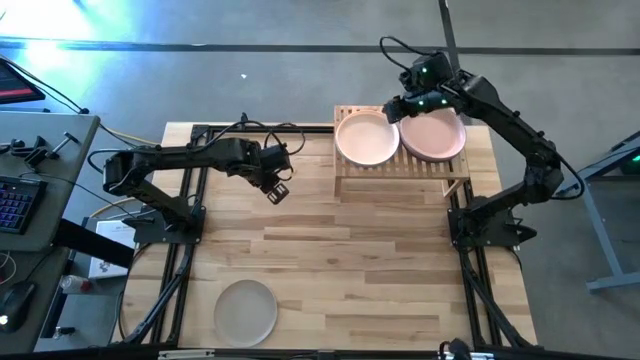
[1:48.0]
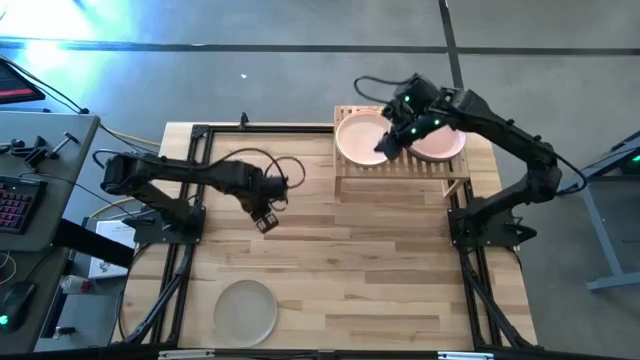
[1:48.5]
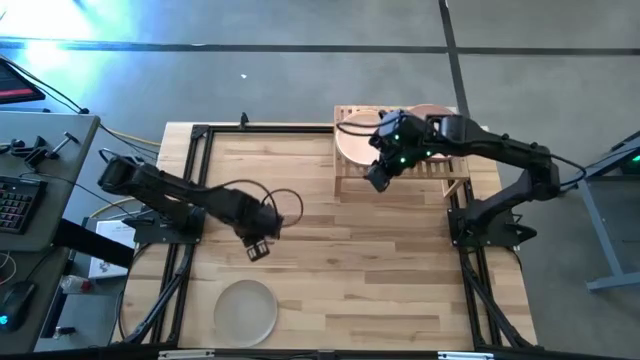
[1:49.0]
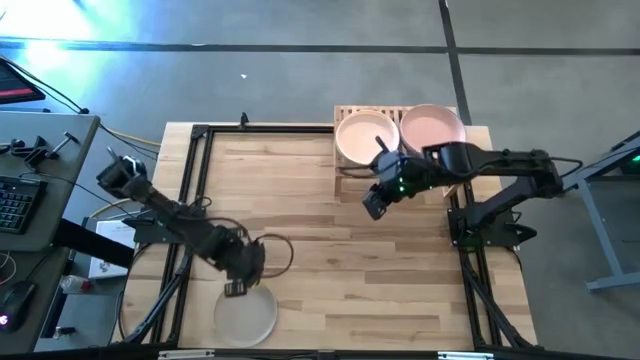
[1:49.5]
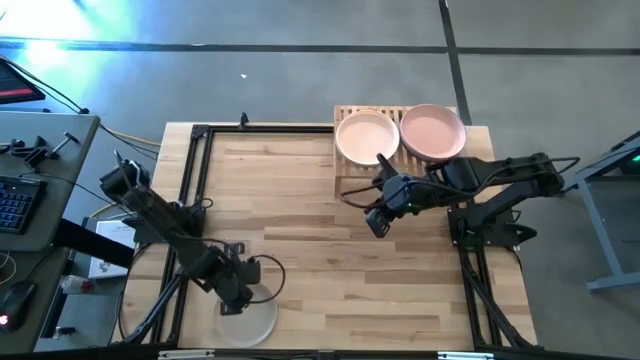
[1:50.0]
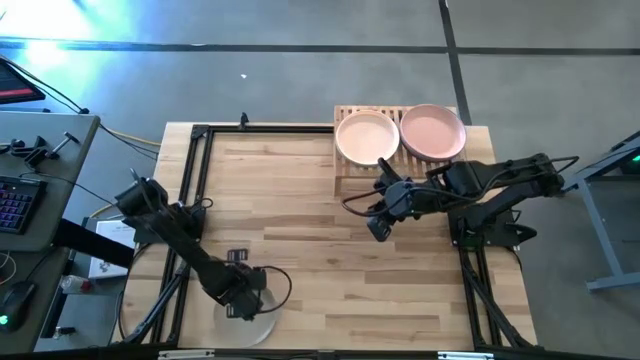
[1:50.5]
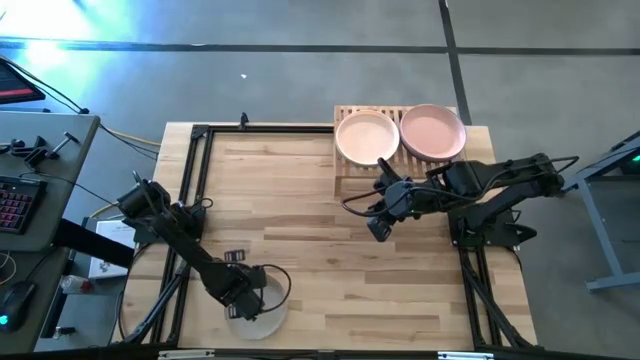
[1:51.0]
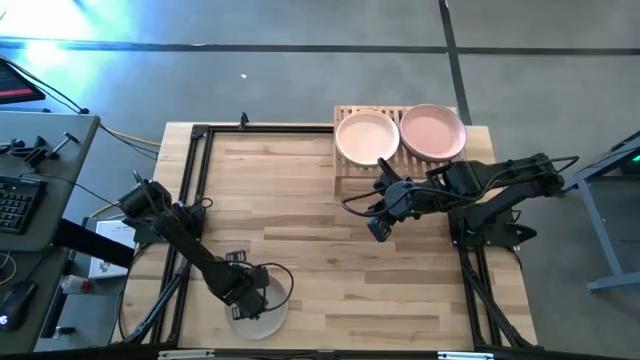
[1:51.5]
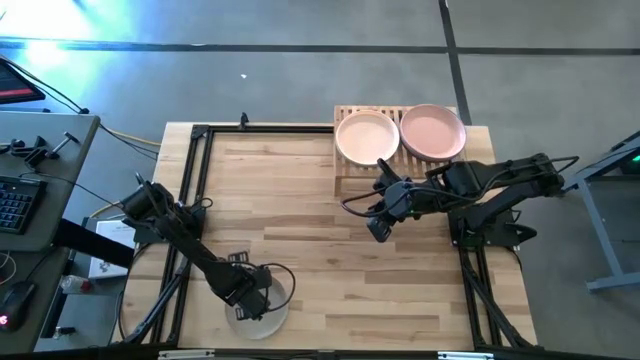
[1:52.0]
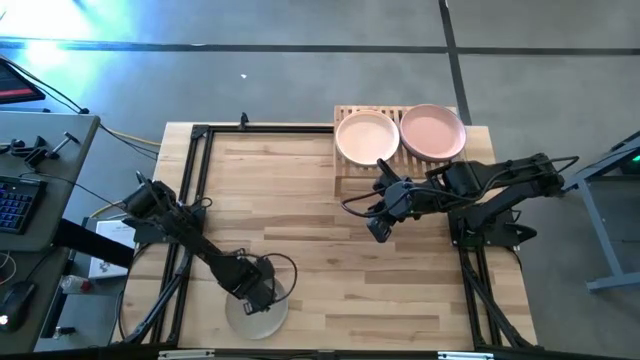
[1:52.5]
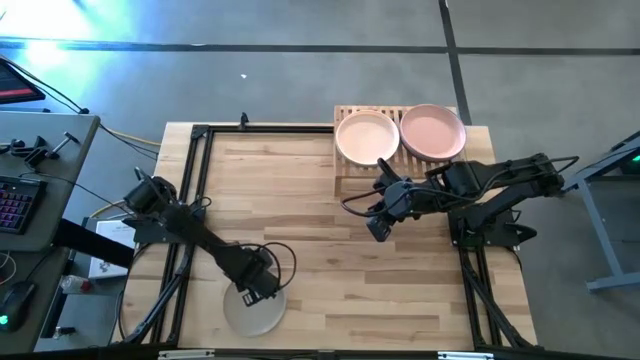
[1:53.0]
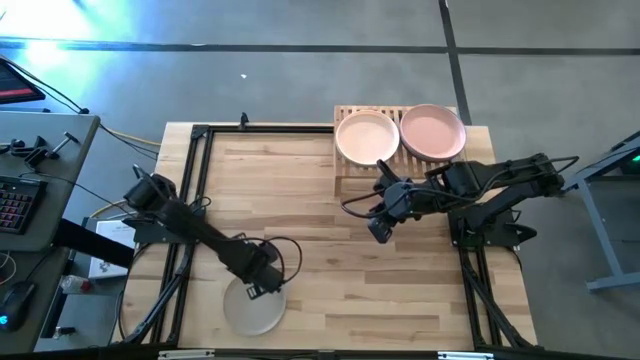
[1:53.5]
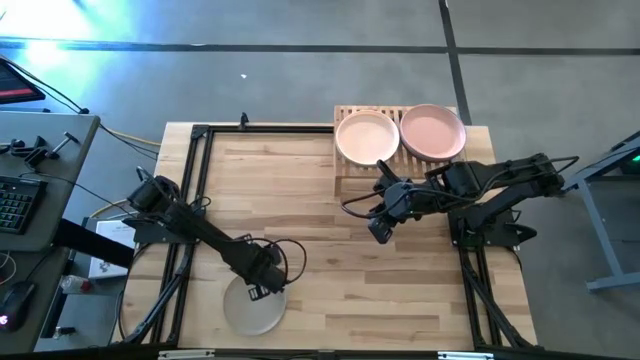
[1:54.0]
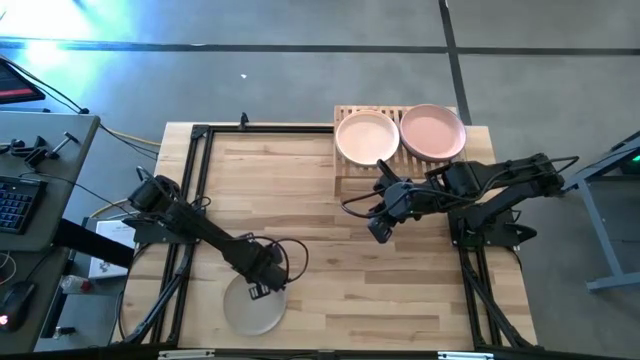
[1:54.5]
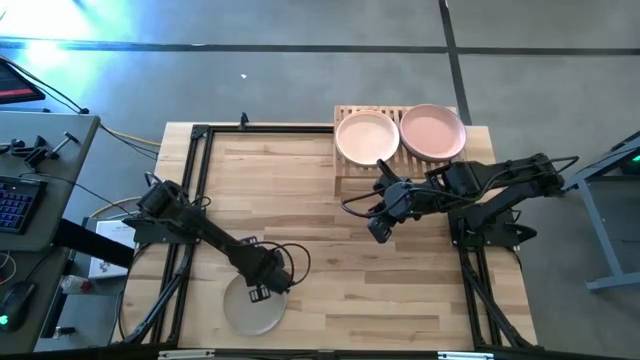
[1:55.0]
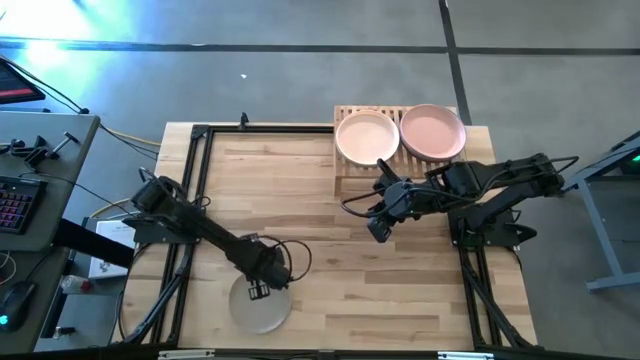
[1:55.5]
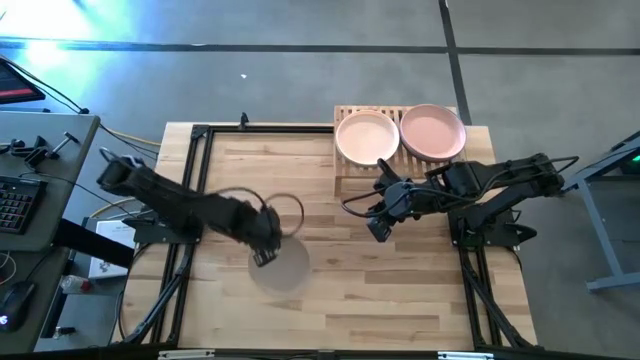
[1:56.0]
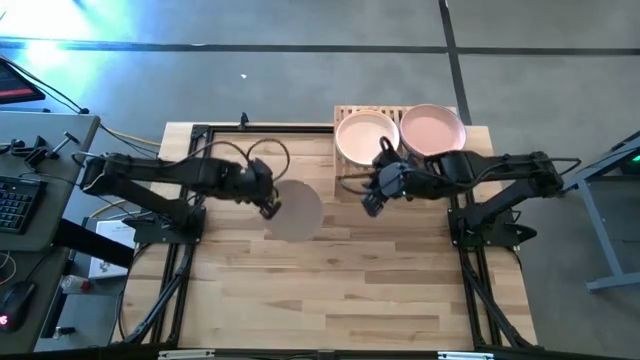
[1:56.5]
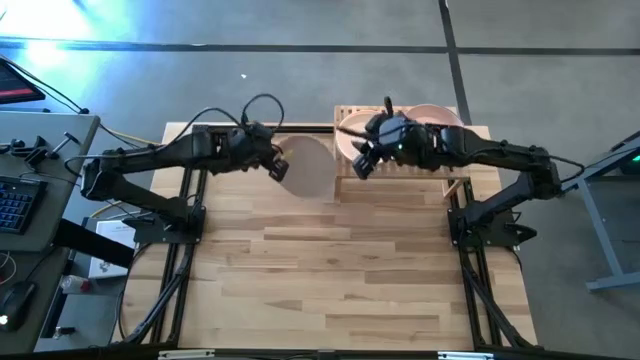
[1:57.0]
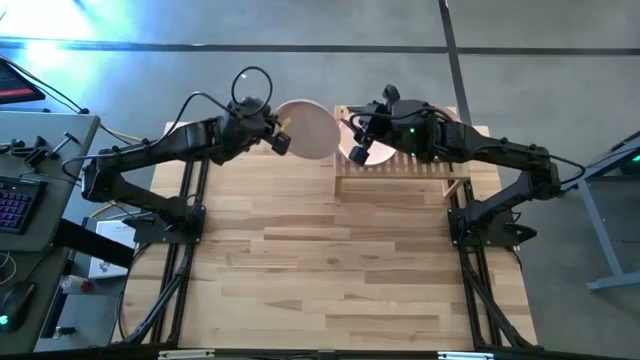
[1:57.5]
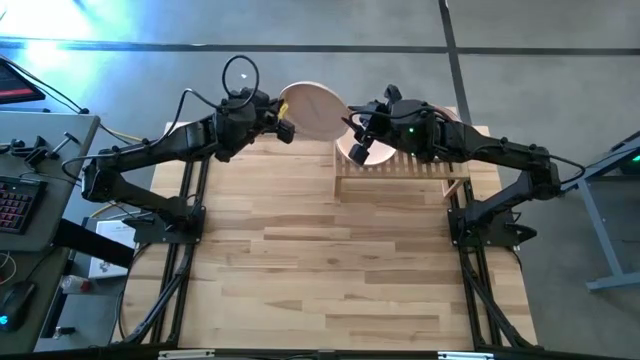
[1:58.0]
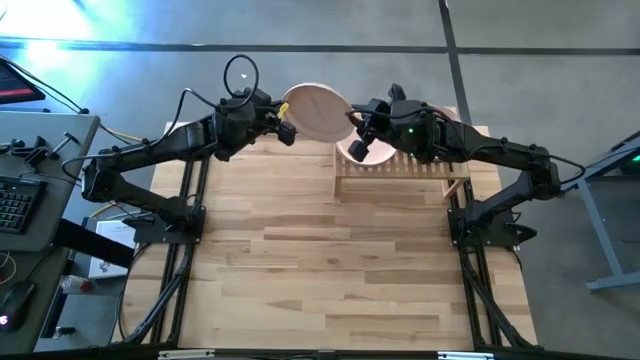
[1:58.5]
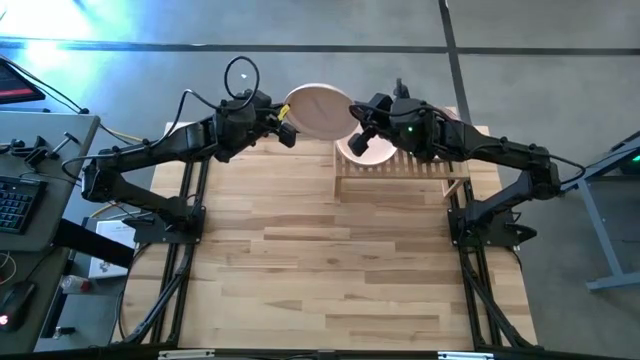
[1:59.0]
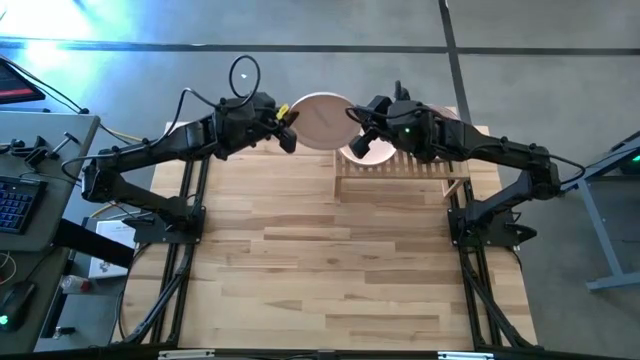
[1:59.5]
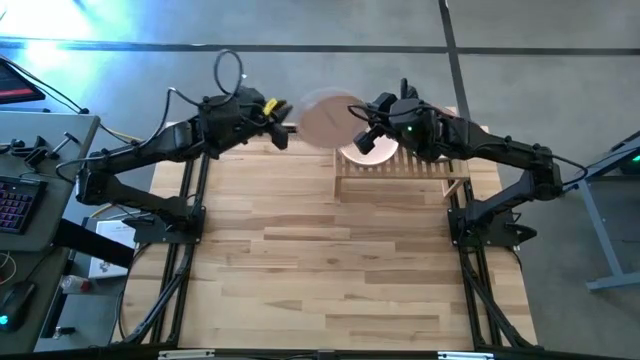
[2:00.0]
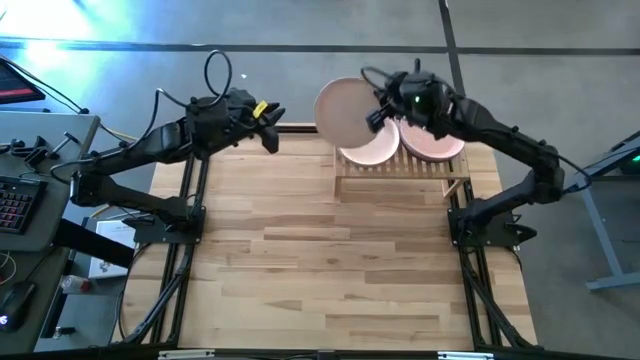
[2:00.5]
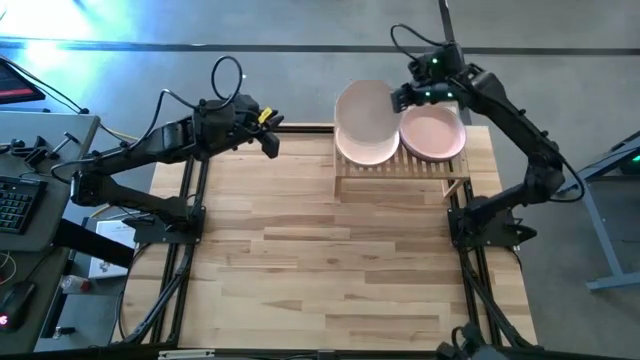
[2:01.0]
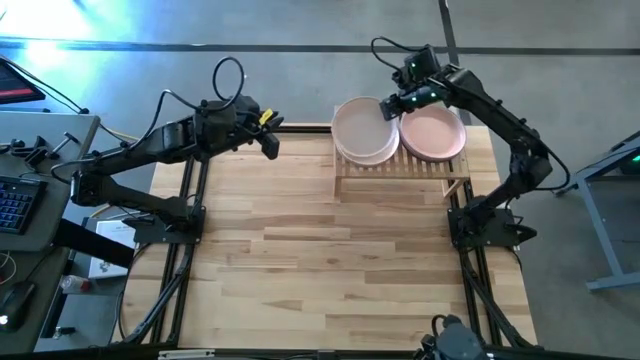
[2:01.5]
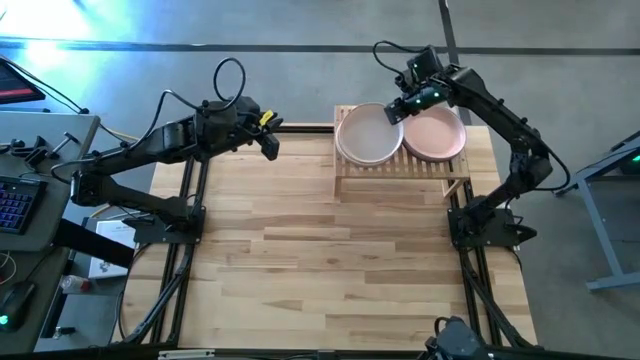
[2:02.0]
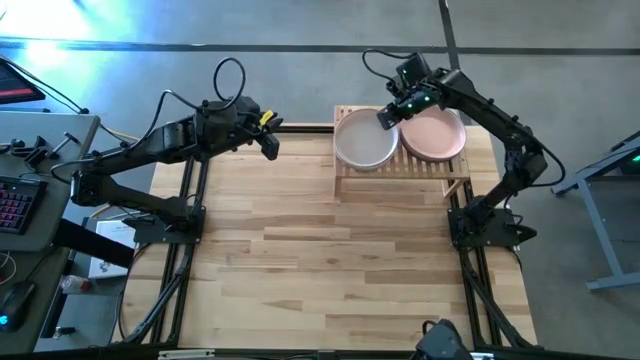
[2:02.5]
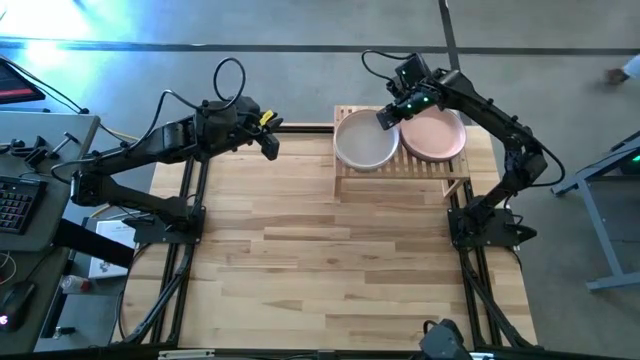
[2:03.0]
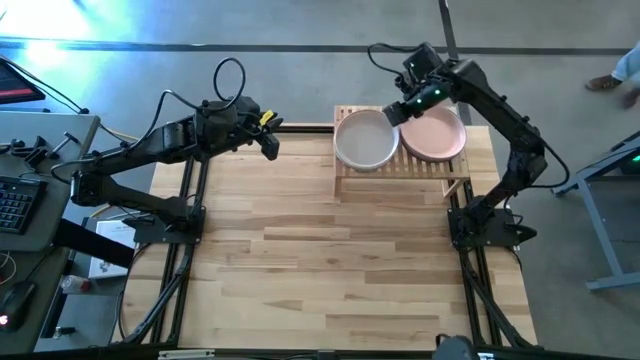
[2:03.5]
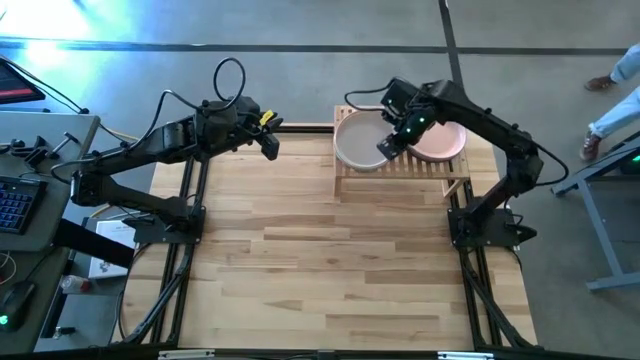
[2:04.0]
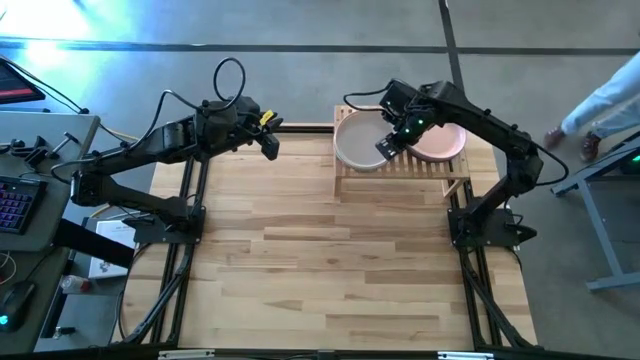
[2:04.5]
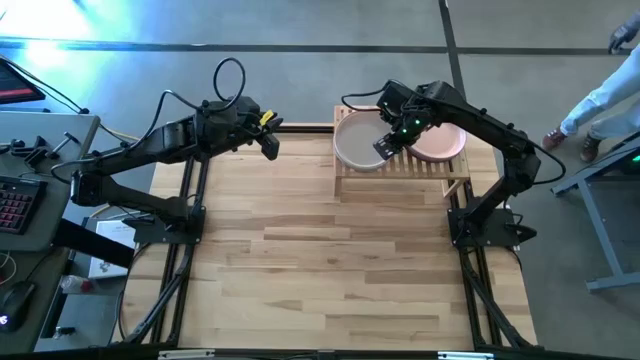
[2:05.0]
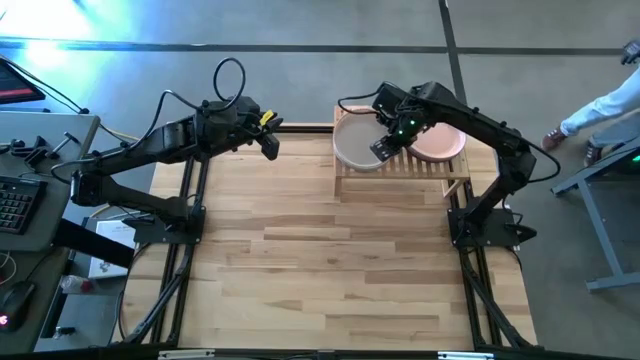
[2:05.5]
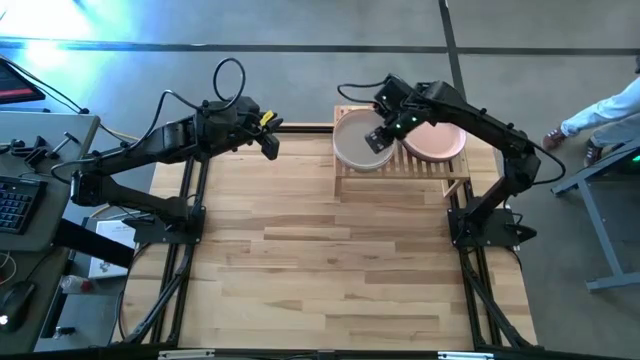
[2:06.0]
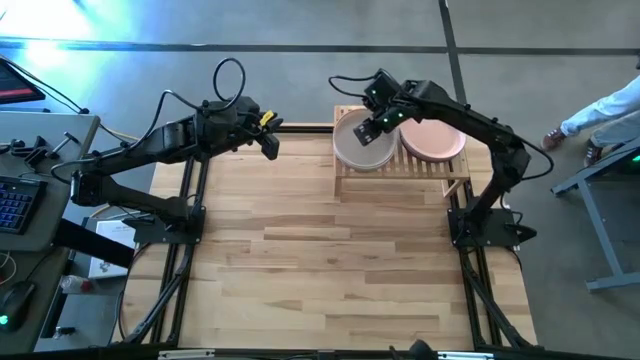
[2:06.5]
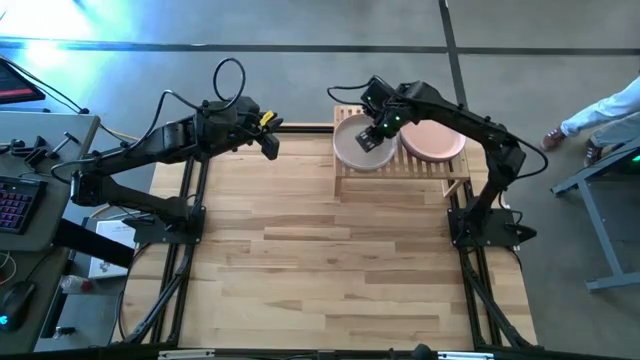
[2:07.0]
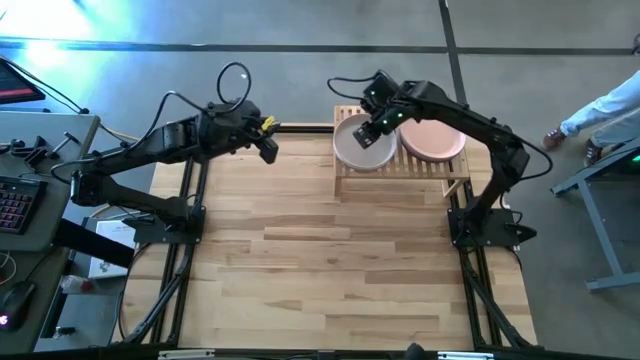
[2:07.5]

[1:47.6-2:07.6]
Task: Place and stack plates onto a shelf
Stack the grey plate on top of the light orange plate on the shelf
